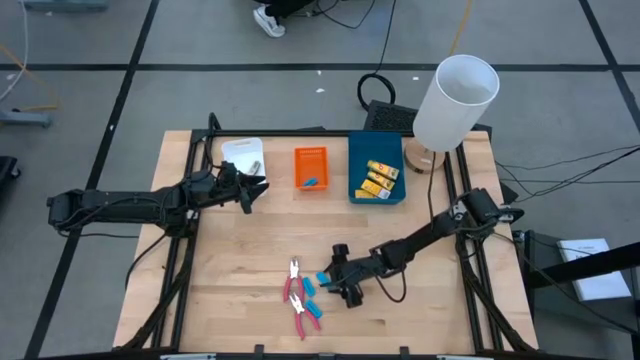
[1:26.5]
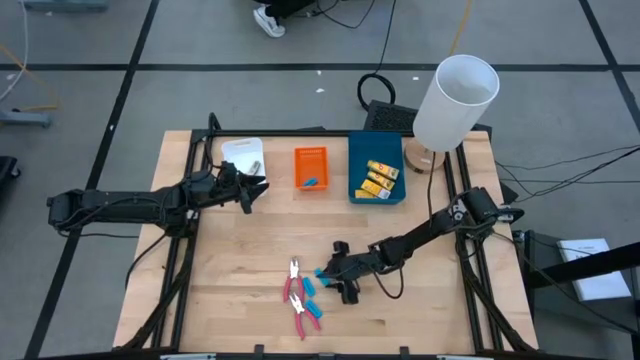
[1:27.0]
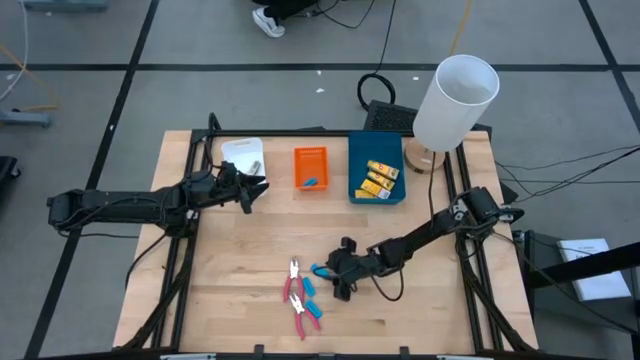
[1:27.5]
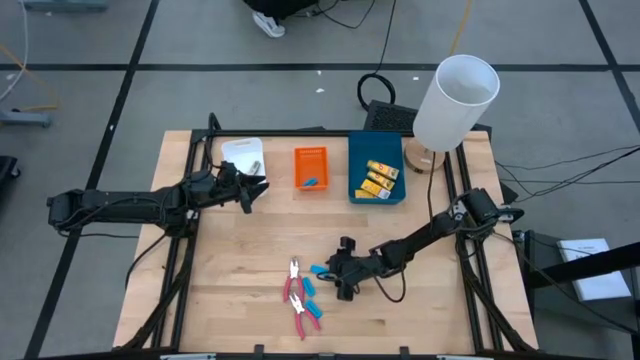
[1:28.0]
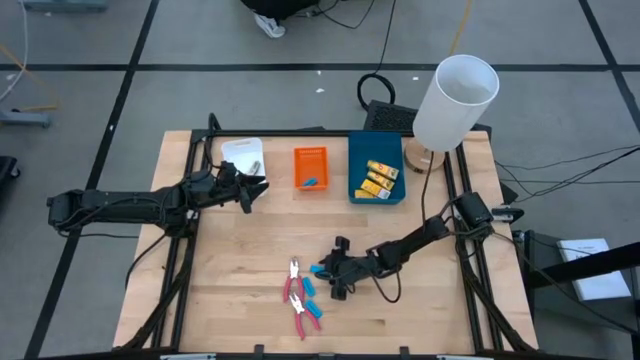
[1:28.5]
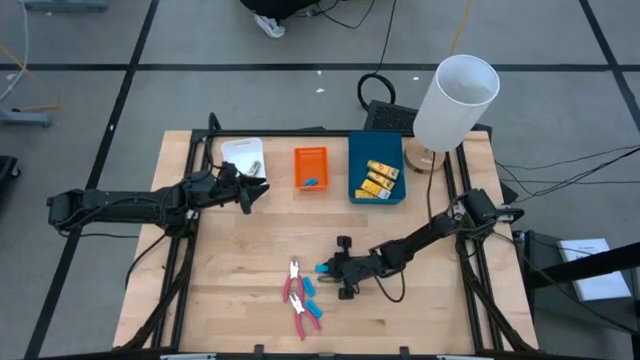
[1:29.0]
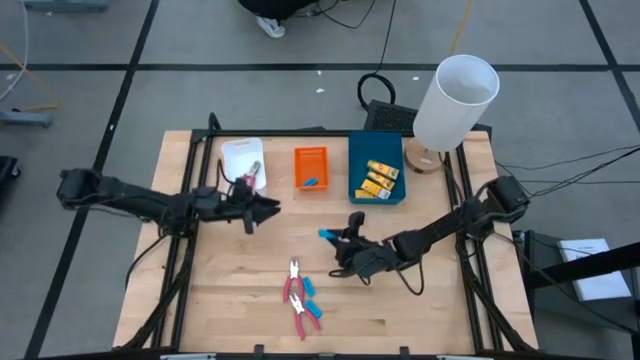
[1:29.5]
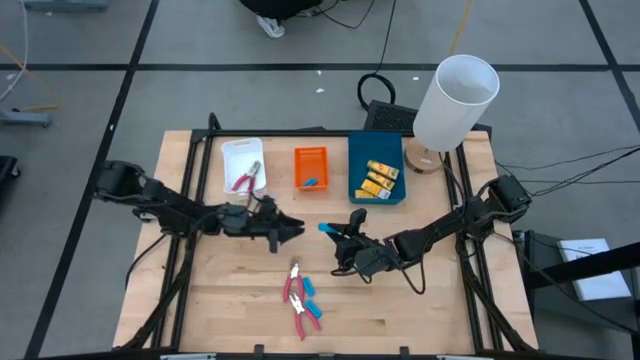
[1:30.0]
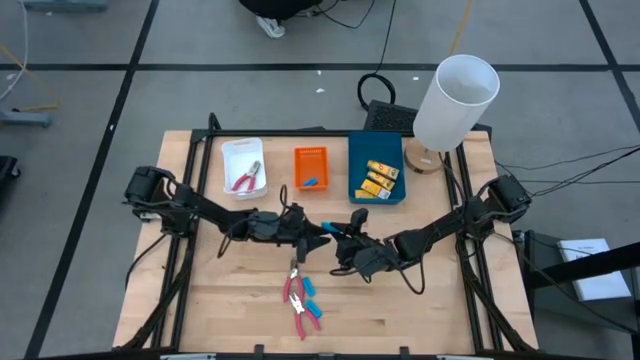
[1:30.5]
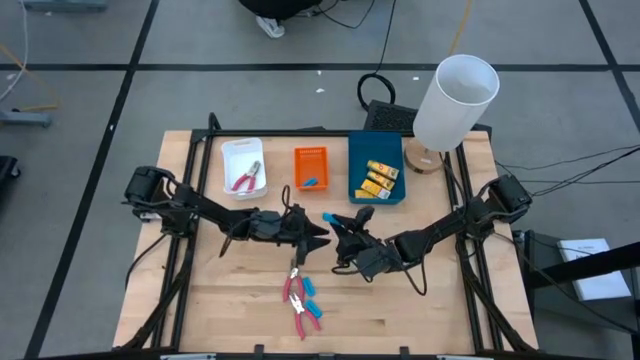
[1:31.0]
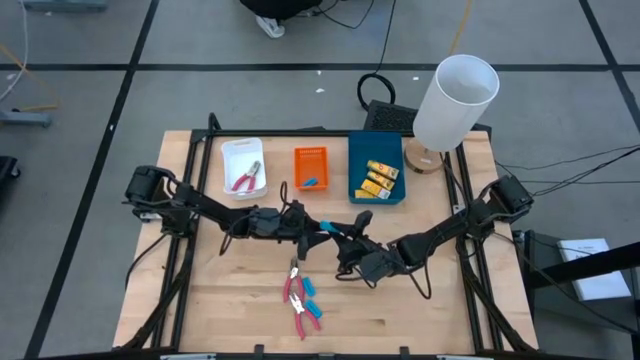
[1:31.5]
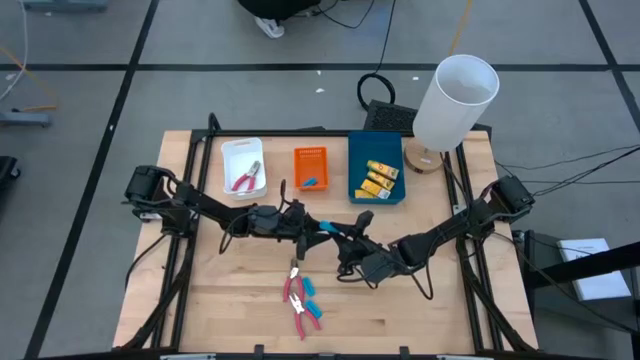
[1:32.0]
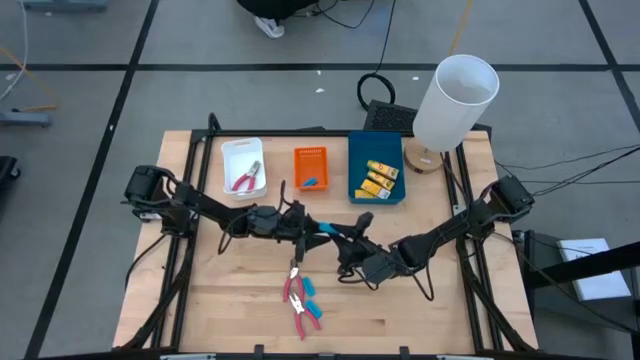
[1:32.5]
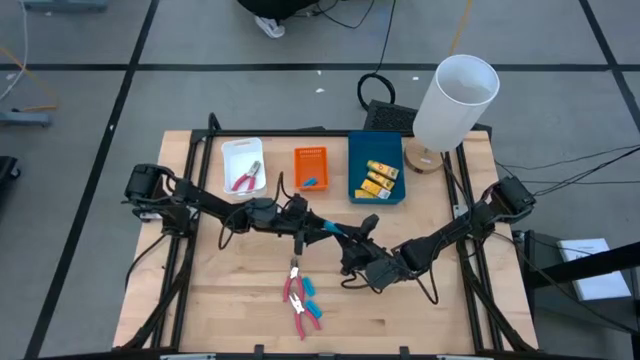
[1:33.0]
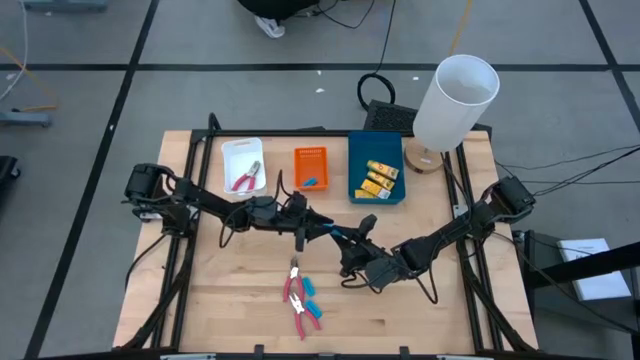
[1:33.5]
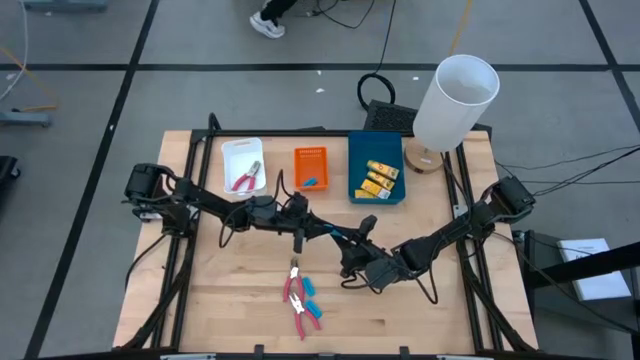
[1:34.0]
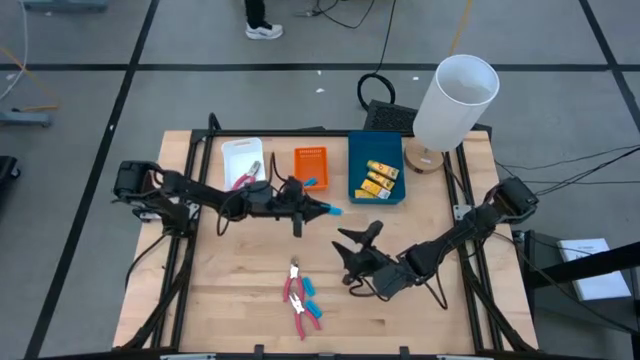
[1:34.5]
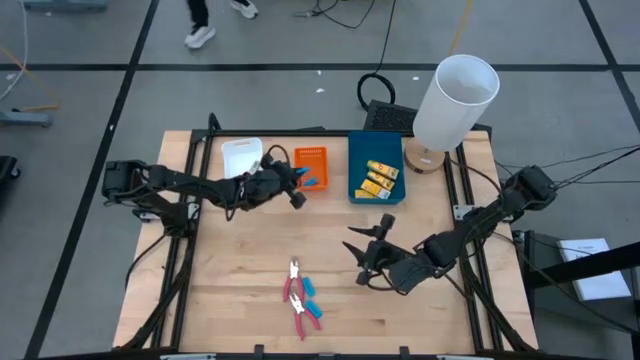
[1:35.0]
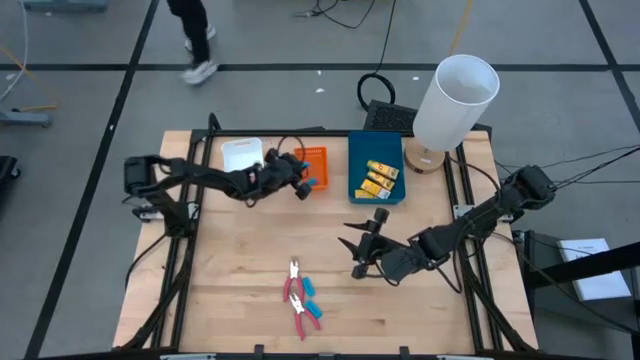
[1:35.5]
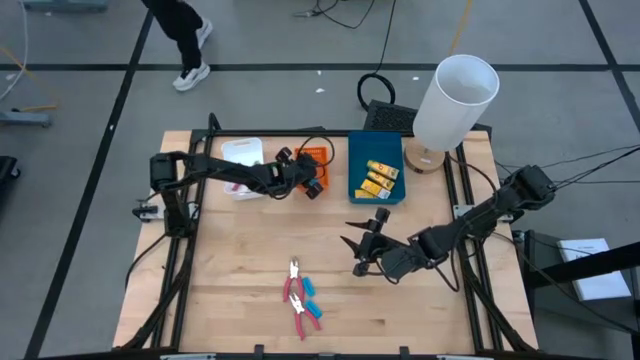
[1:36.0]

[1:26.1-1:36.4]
Task: Pick & Place School Supplies
Put the eraser into the orange bin

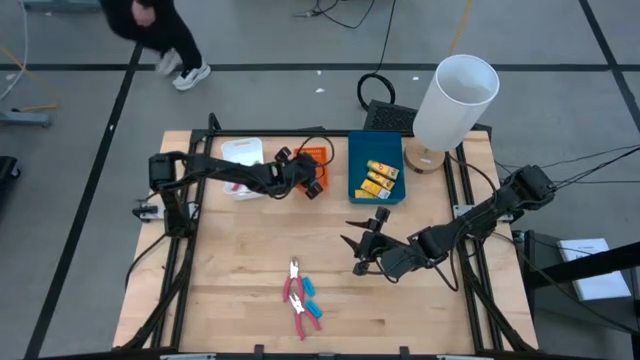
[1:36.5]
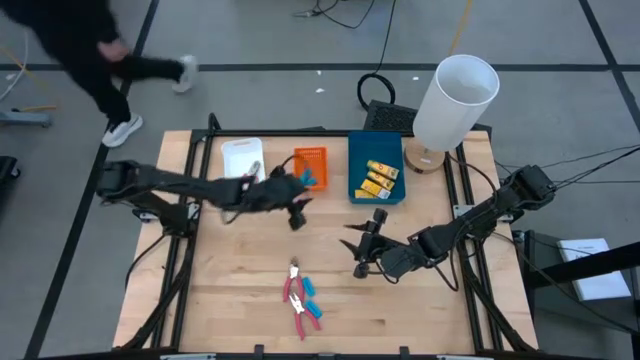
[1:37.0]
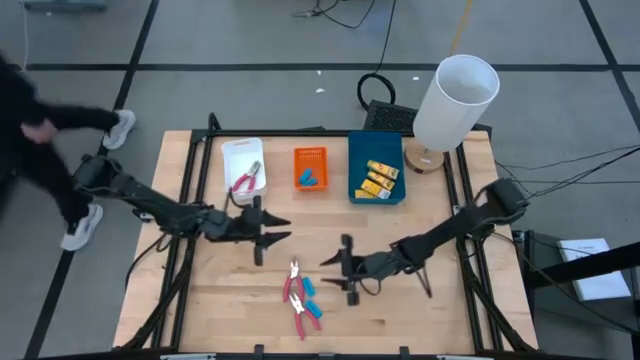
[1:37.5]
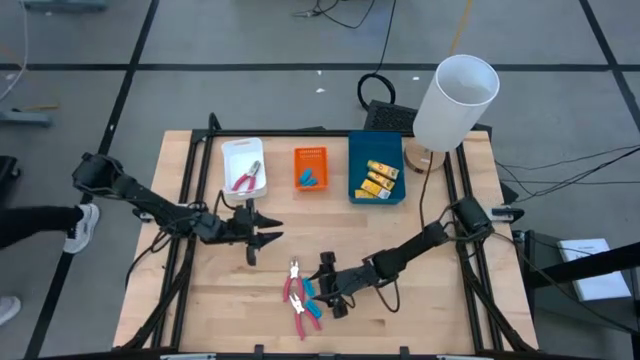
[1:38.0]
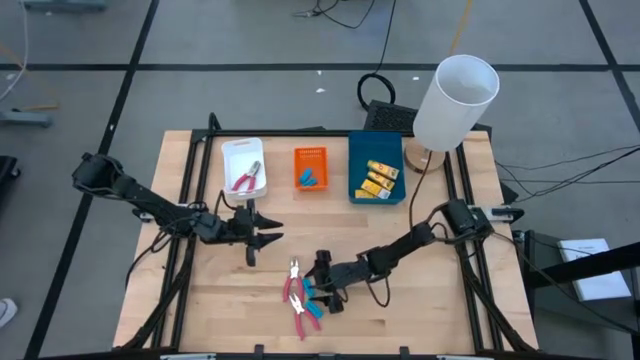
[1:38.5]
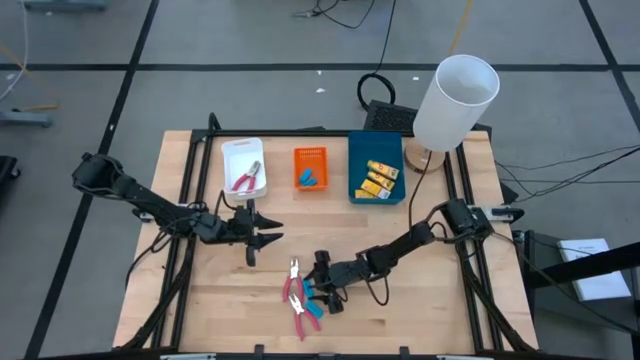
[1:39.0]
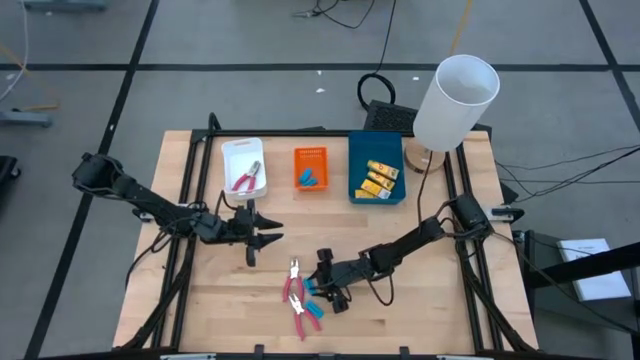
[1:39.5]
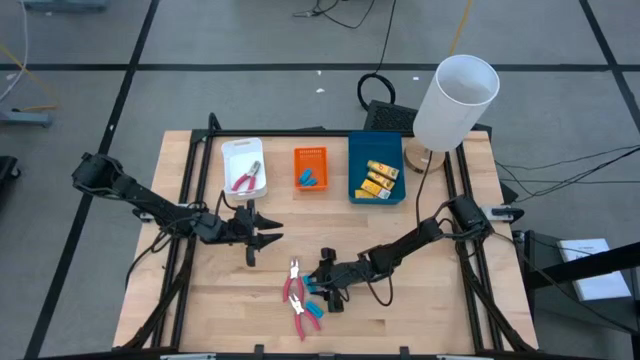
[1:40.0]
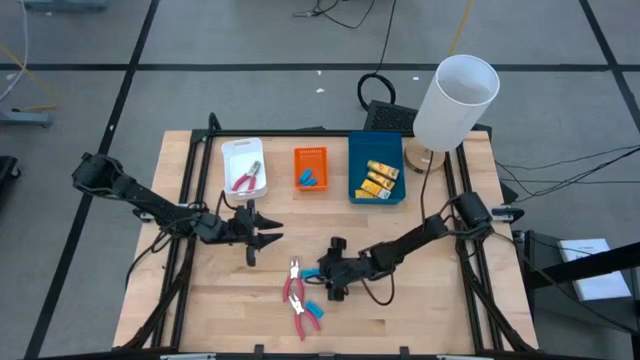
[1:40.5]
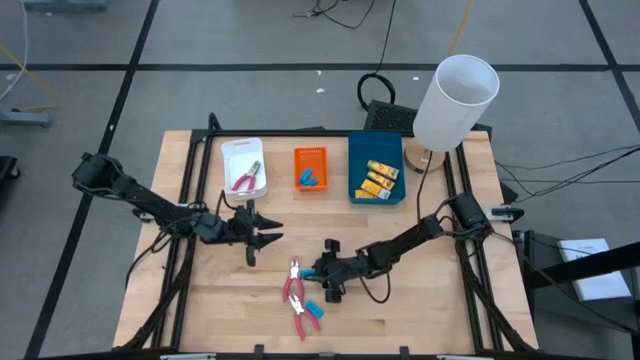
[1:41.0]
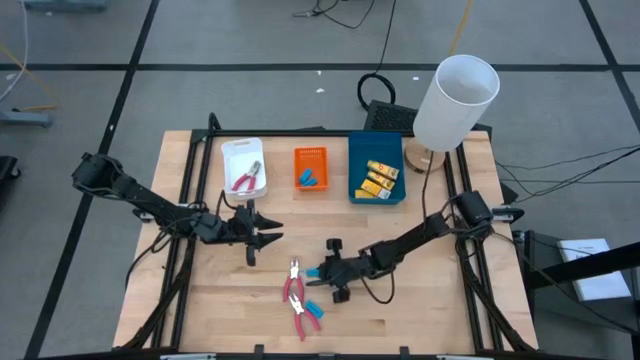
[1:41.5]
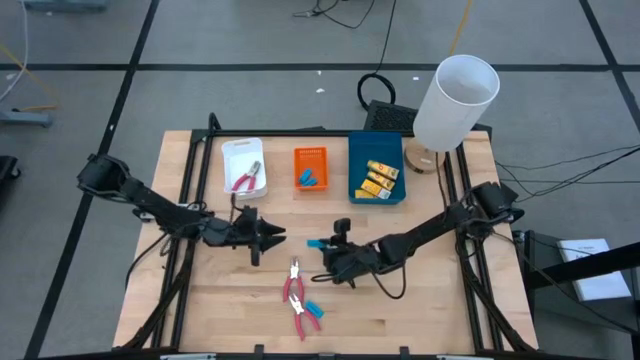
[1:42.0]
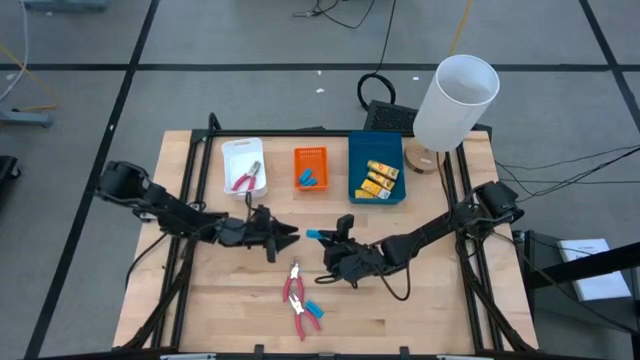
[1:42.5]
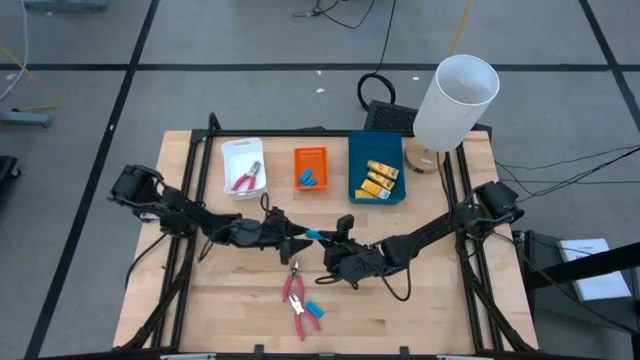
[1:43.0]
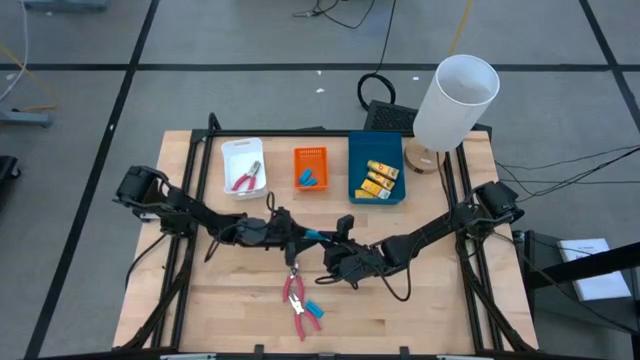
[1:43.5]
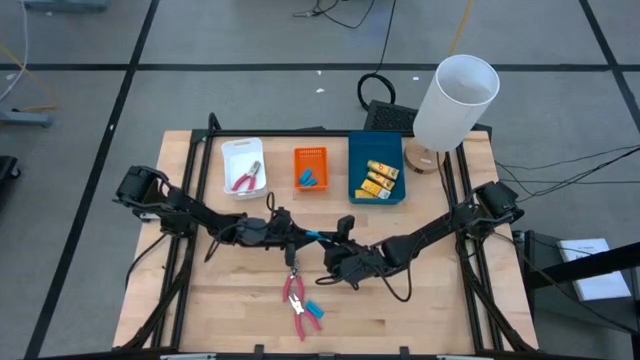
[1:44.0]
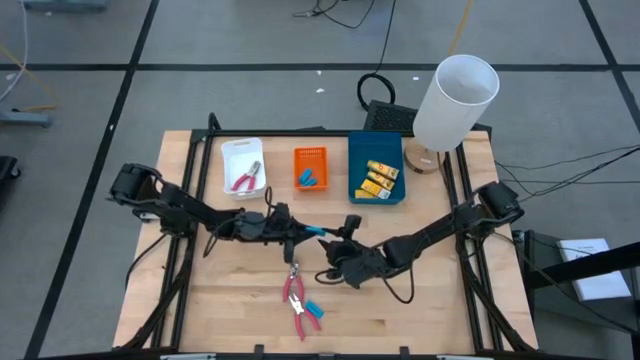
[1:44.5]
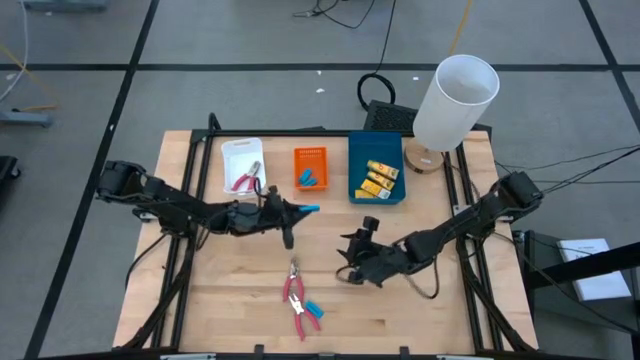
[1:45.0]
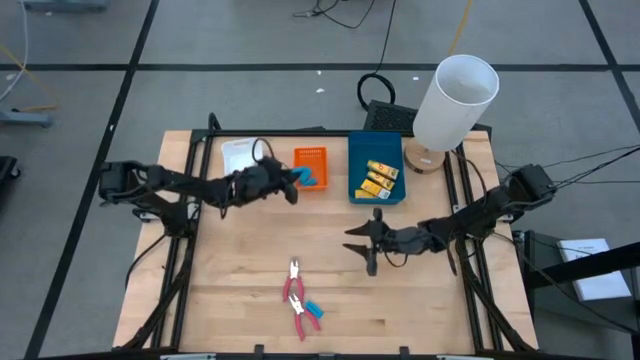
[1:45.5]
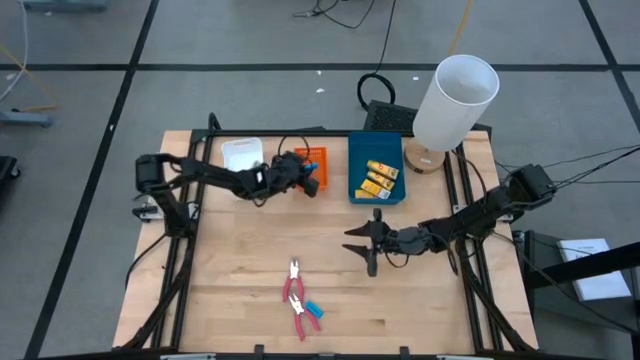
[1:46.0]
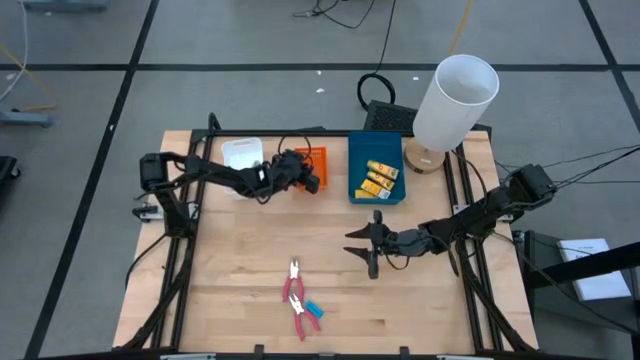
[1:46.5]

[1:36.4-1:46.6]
Put the eraser into the orange bin

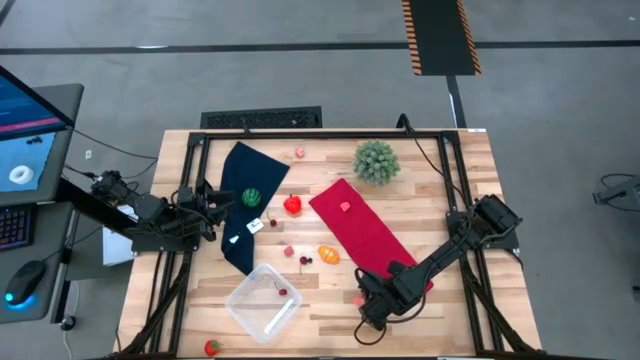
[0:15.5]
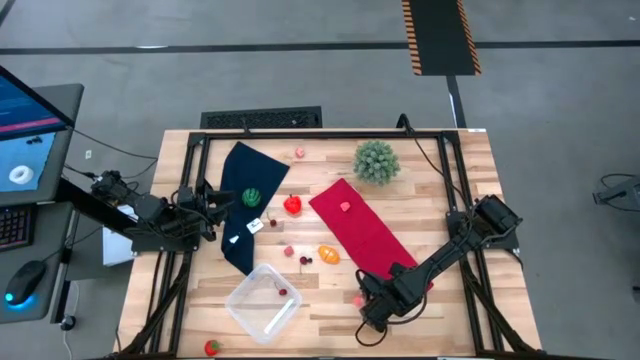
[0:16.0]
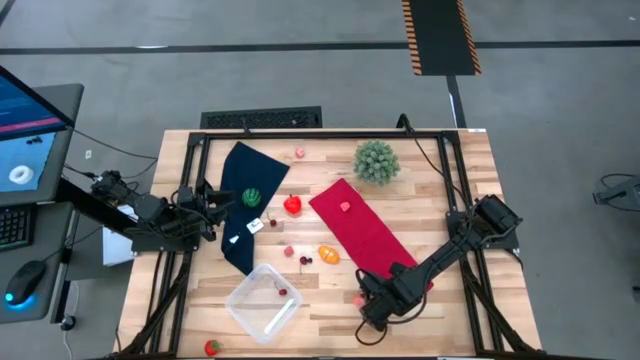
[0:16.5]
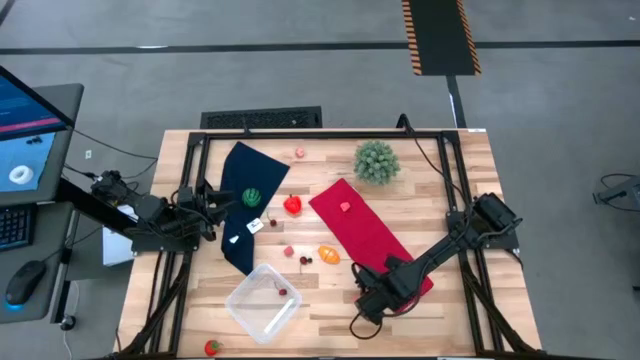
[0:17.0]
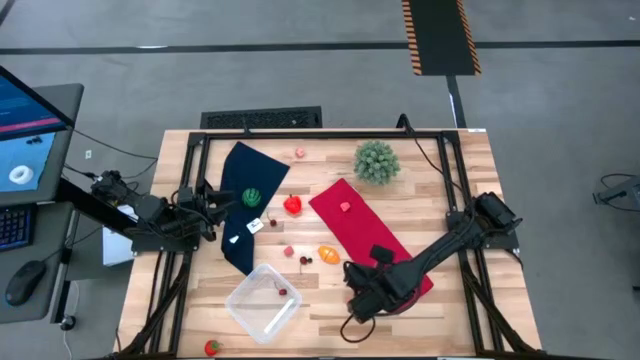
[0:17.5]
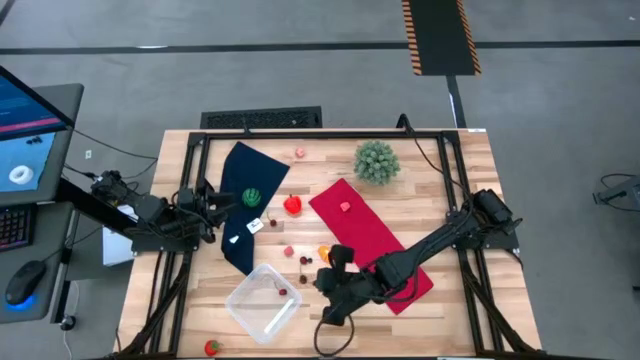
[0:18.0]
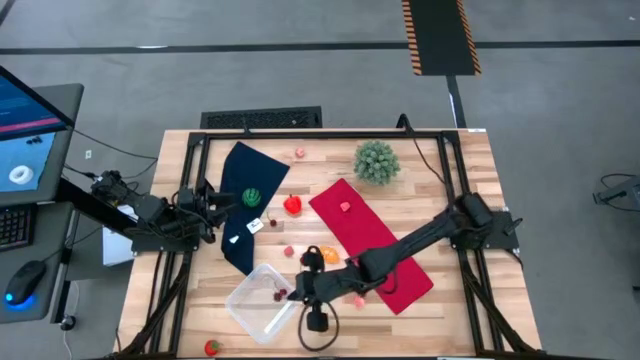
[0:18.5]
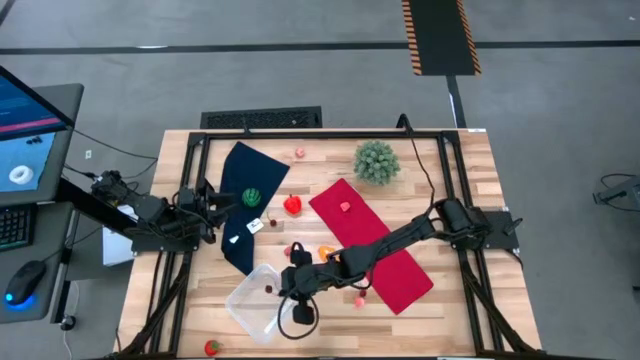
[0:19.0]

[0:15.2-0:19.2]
Task: Pick and placing Produce into tupperware
Put the cherry into the transparent bin
